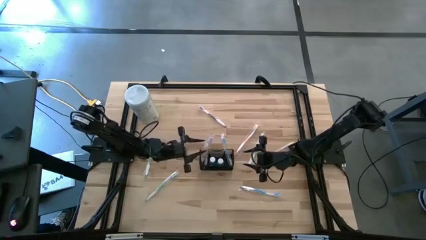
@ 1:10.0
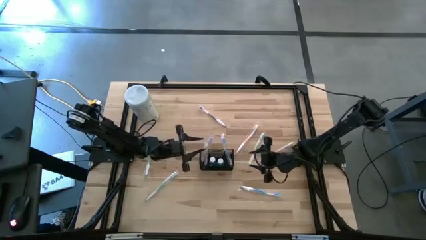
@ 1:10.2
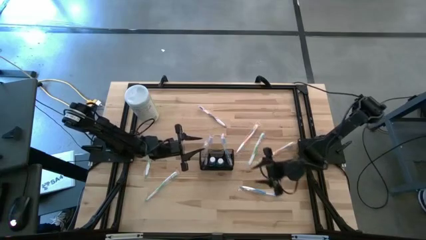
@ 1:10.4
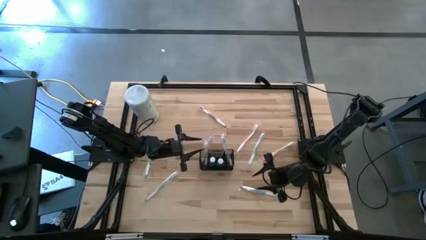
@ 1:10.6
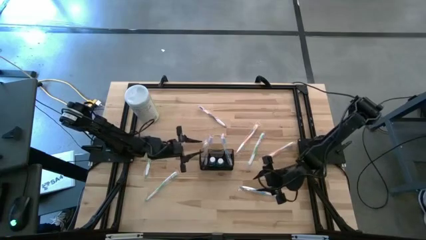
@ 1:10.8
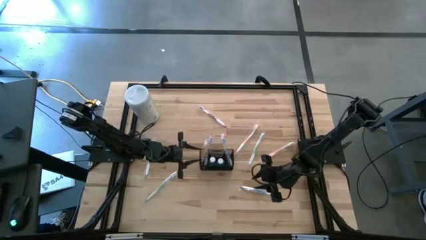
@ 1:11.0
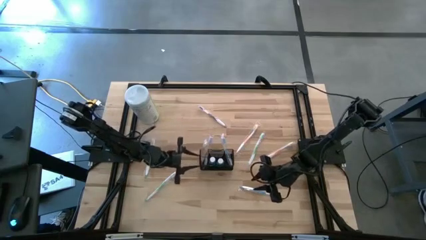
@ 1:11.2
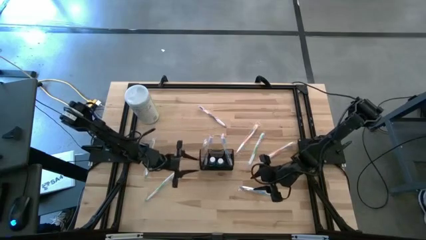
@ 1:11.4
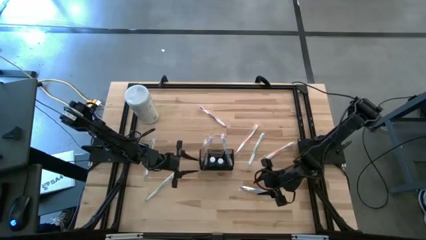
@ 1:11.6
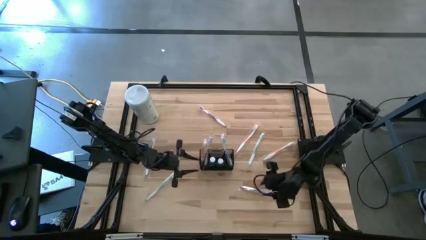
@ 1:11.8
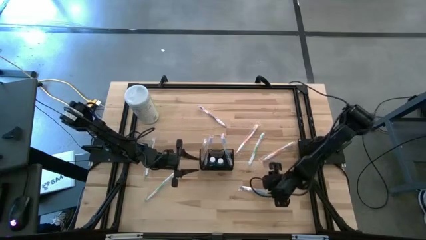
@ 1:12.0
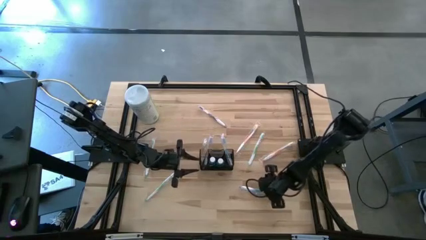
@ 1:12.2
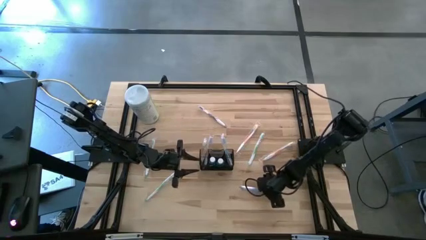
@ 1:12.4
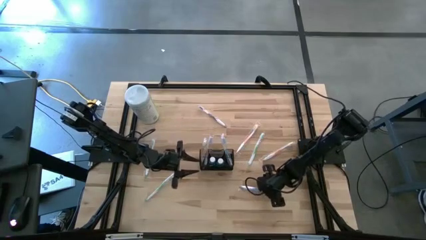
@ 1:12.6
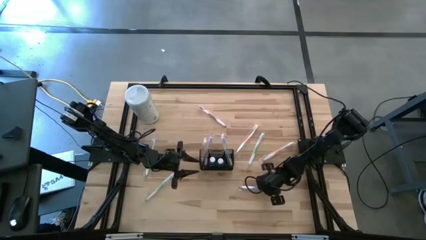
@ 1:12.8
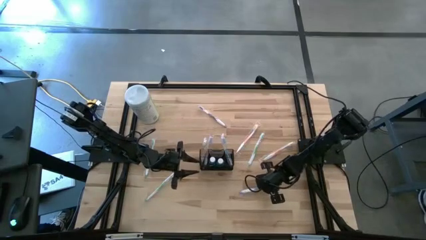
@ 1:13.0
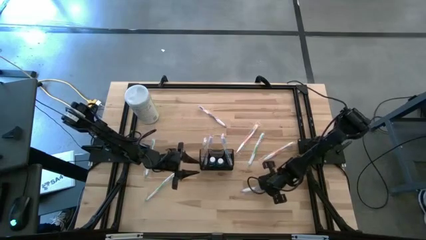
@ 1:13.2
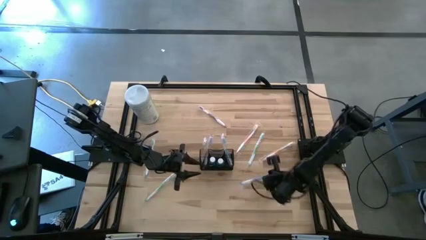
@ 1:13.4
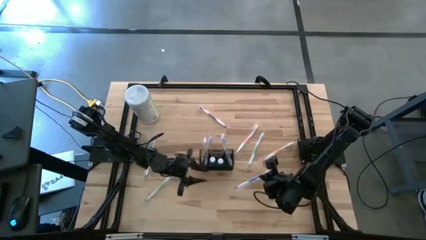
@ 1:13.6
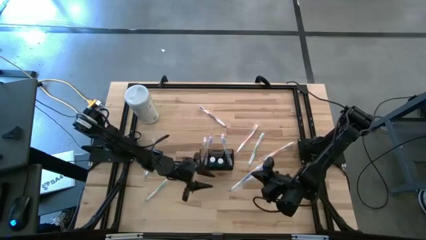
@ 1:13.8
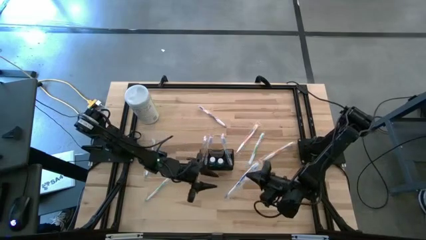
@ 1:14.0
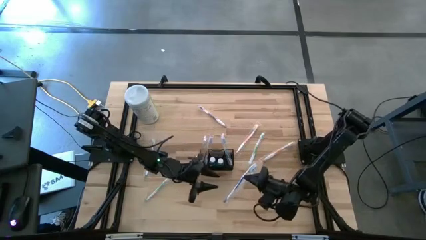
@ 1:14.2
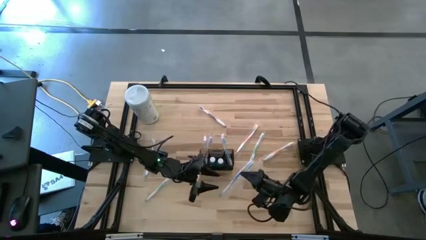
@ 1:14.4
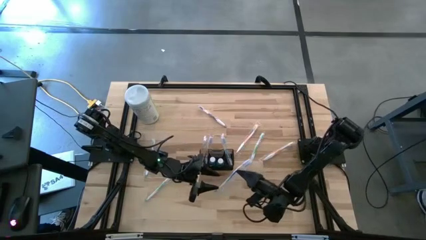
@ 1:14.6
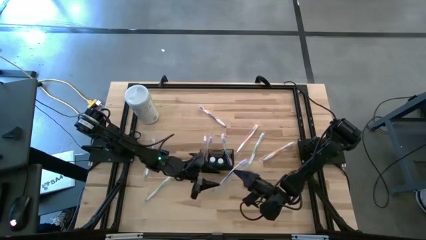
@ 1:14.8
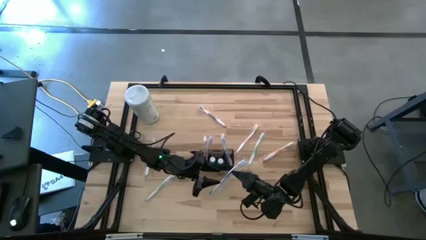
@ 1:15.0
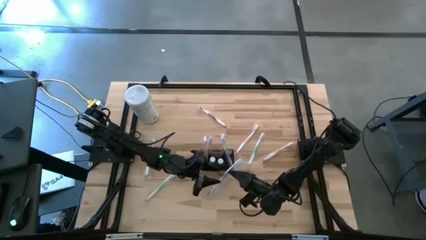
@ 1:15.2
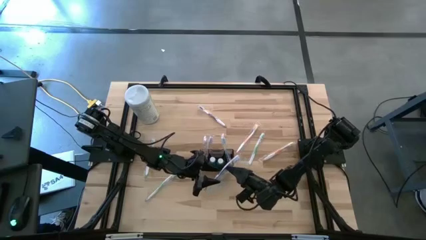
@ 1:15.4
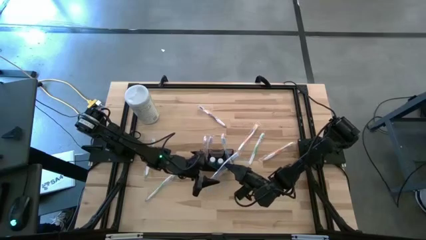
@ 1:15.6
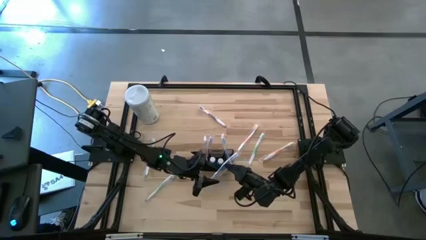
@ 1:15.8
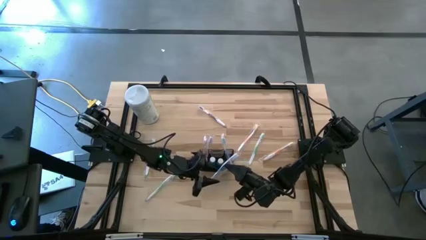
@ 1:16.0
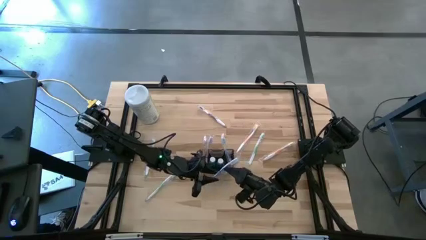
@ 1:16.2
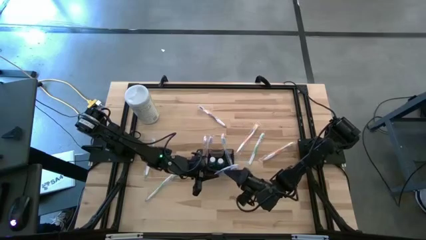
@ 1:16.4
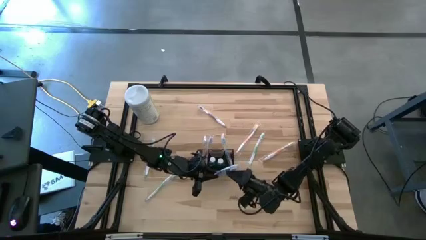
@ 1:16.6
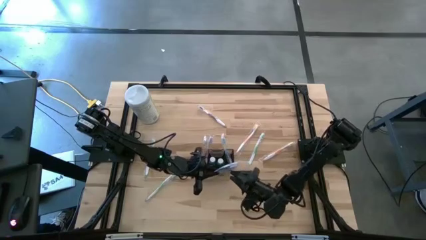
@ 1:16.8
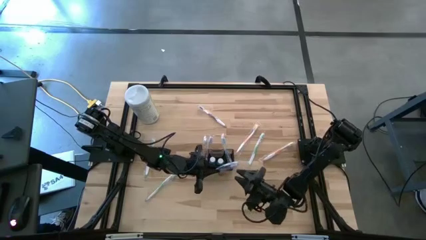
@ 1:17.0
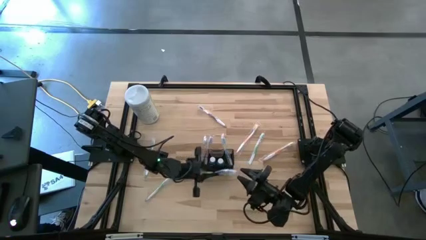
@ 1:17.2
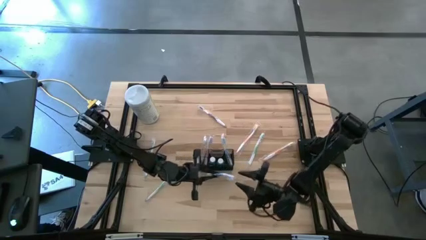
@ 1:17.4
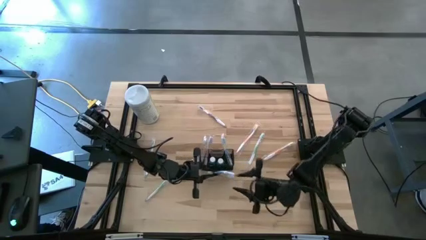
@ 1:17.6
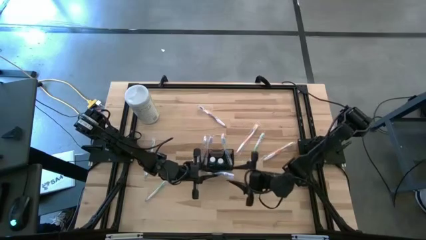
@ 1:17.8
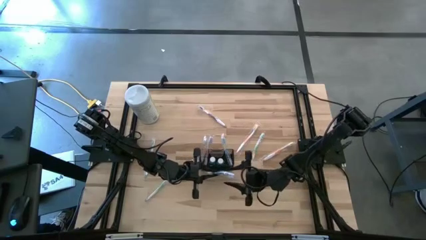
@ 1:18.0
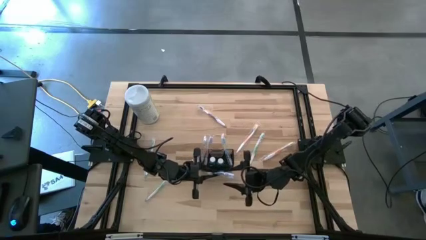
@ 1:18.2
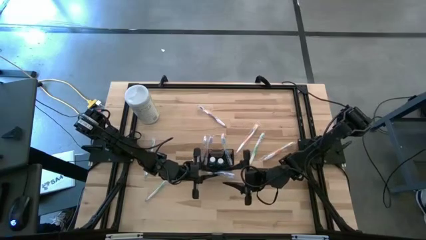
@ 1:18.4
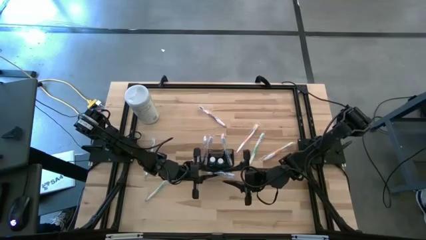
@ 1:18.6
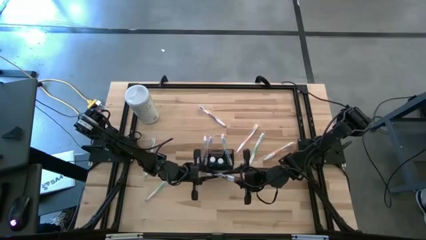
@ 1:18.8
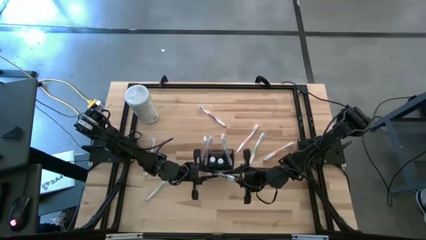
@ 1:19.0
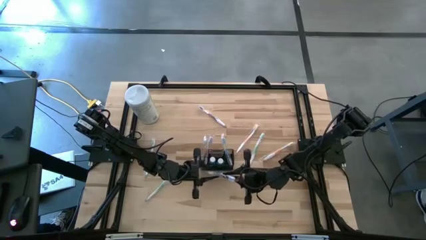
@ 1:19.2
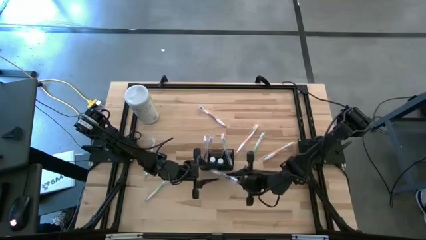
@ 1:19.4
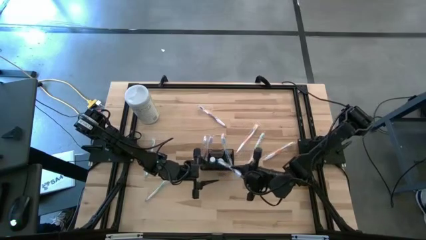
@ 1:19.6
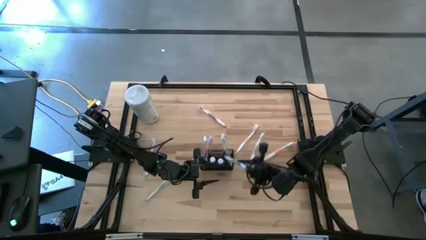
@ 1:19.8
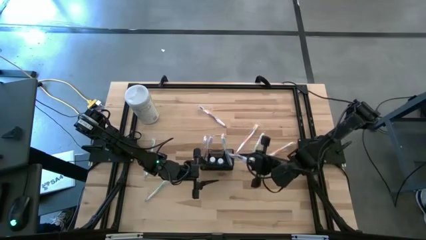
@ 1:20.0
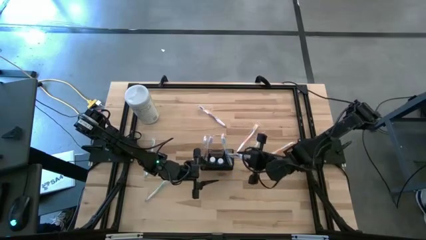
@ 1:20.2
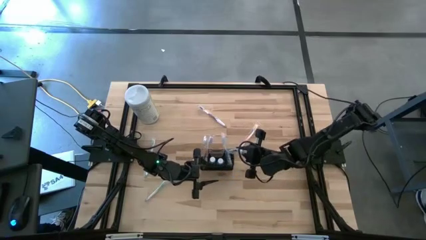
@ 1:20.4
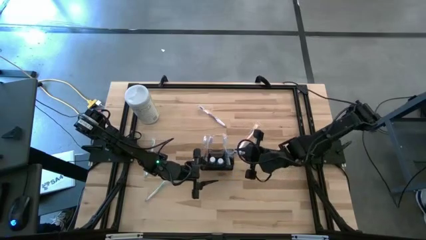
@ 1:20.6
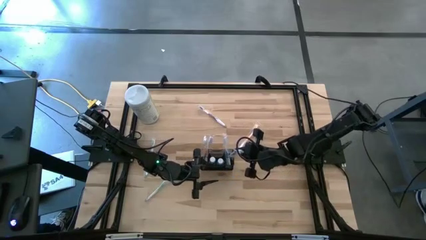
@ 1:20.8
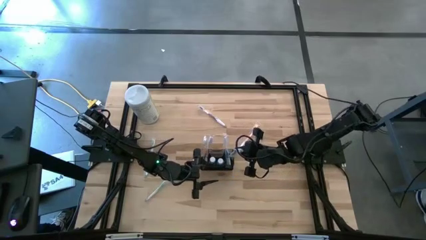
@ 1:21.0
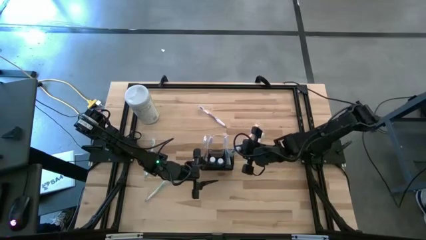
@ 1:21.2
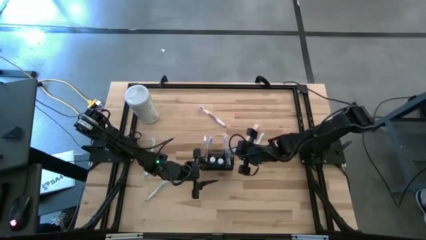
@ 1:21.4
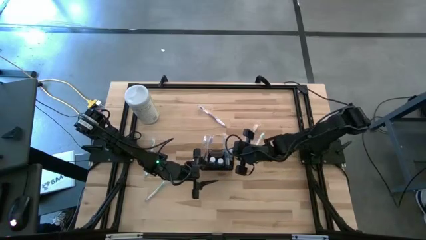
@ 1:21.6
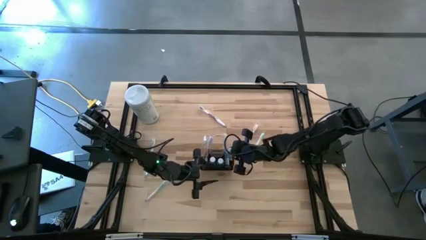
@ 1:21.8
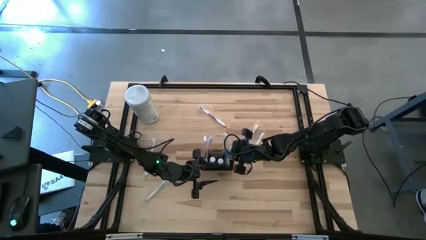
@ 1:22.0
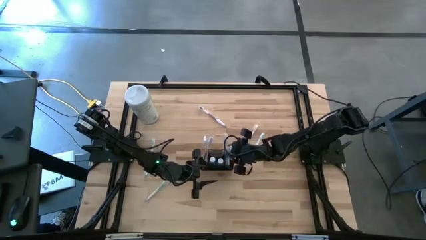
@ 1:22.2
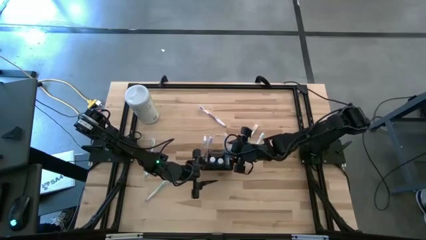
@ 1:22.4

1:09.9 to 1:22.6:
Task: Pick & Place toothbrushing station
Put the blue toothbrush into the black wire organizer

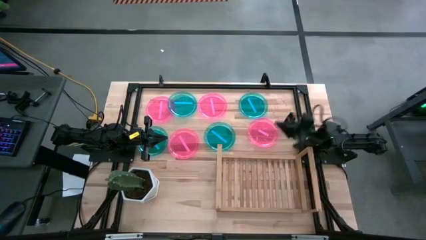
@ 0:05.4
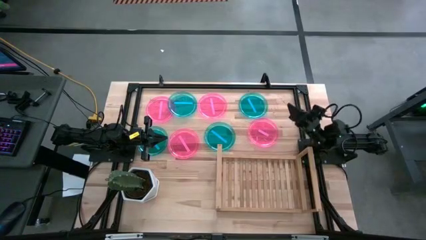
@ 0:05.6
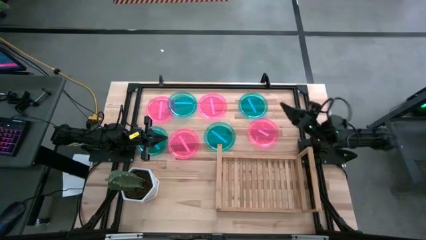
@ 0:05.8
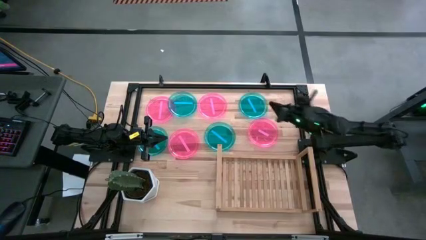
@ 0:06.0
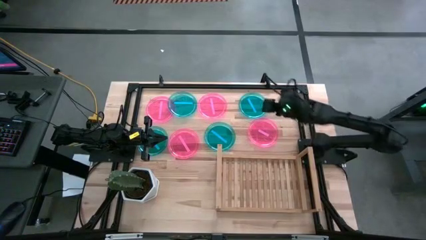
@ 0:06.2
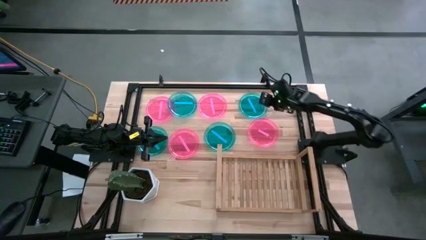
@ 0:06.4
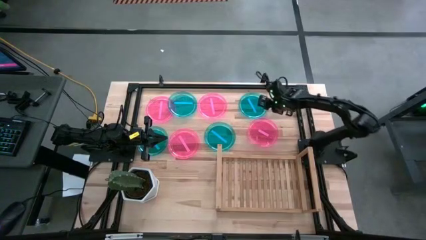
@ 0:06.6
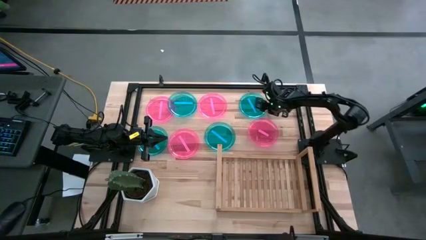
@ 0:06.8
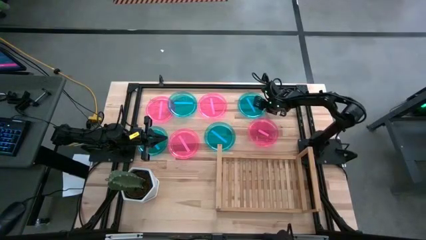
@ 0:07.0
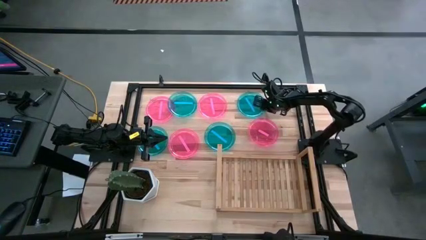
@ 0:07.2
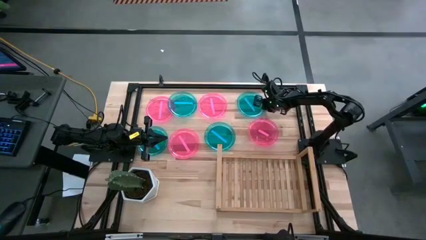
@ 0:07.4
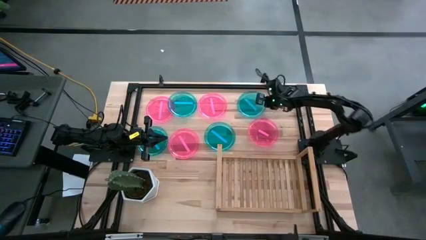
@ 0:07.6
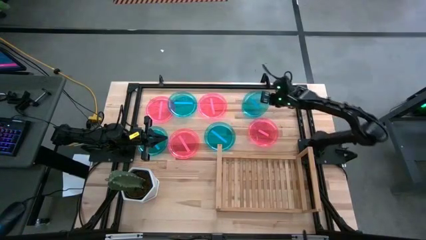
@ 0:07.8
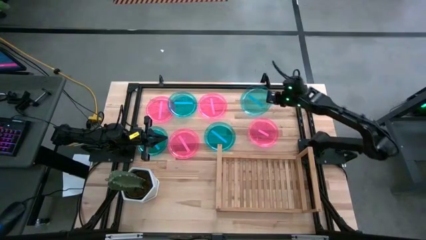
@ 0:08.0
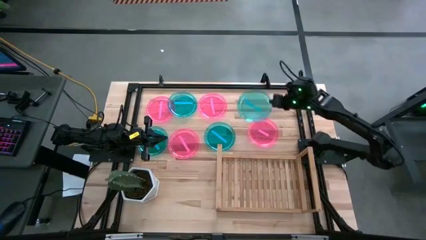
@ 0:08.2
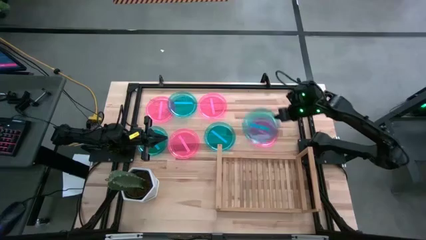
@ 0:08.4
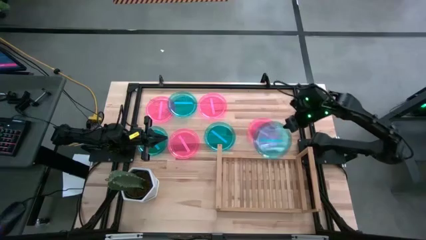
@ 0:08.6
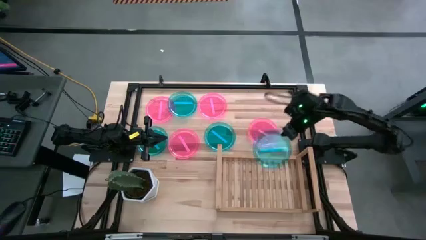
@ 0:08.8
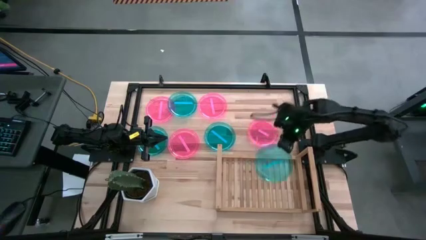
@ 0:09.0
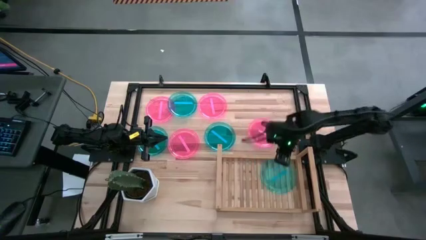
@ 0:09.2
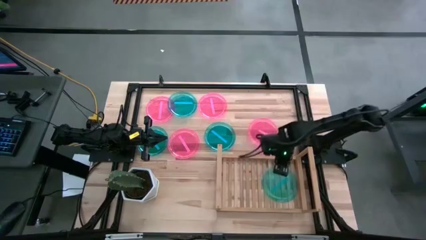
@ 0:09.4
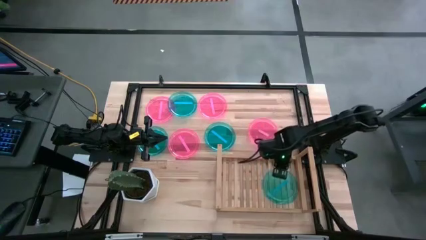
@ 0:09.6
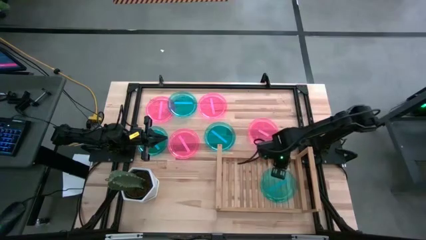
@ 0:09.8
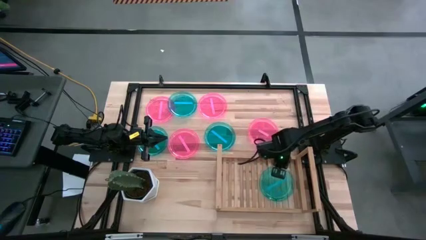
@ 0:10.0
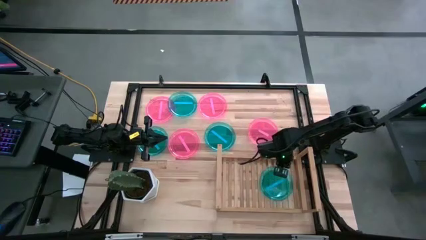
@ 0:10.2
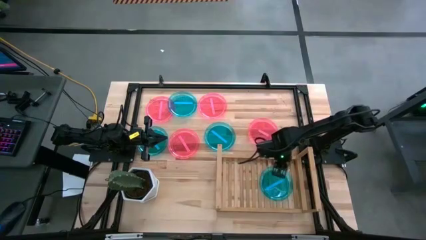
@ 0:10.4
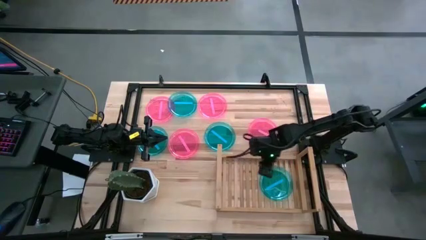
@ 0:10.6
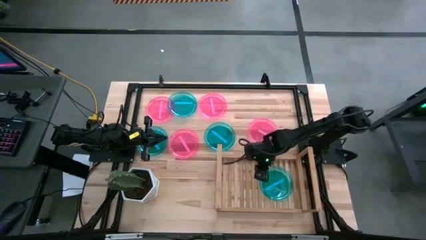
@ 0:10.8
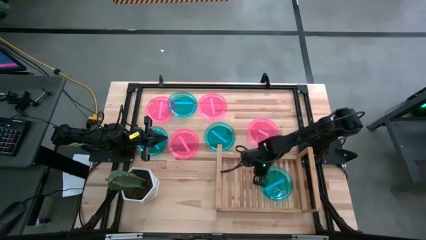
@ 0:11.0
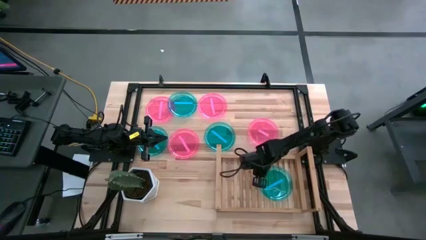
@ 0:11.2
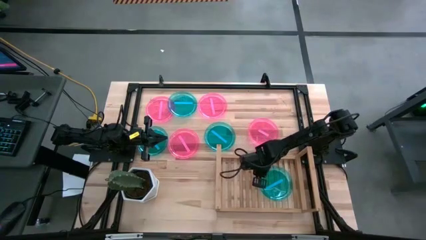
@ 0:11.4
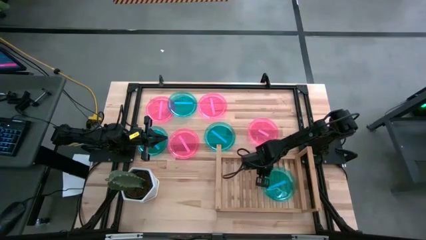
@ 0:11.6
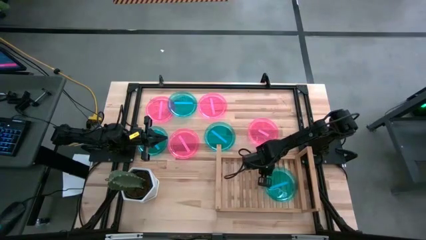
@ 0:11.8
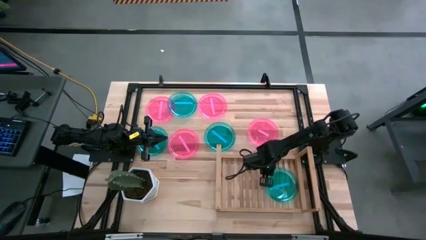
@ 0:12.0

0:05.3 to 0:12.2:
Task: Place and stack plates onto a shelf
Put the blue plate on the shelf
